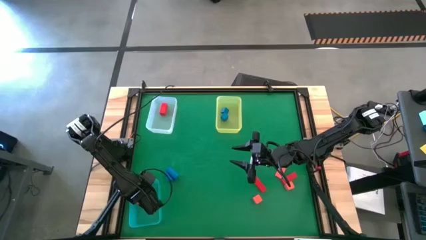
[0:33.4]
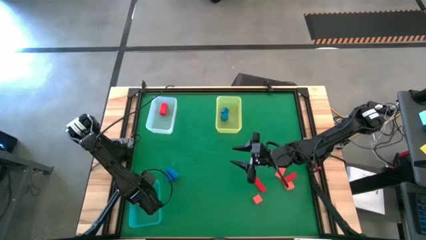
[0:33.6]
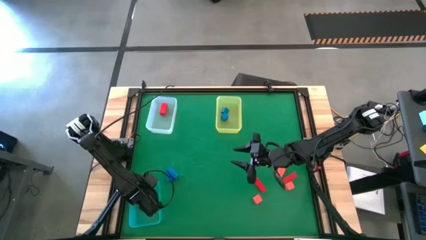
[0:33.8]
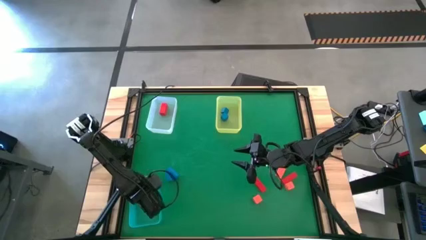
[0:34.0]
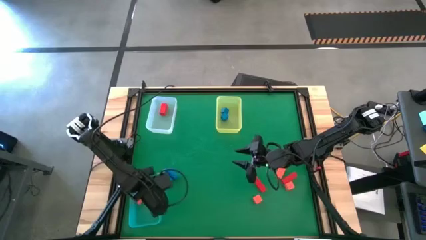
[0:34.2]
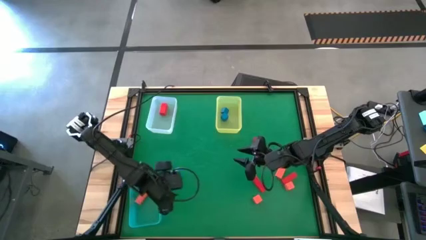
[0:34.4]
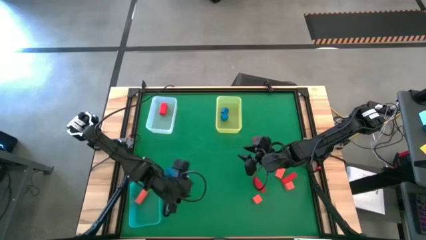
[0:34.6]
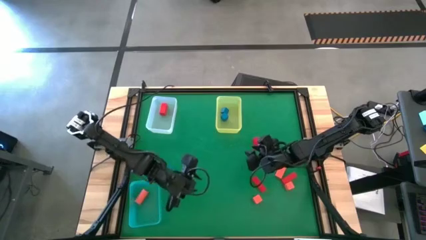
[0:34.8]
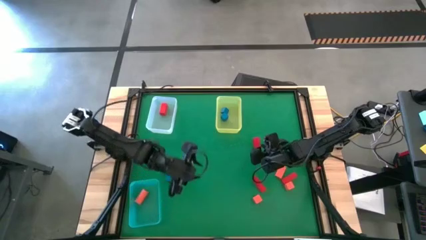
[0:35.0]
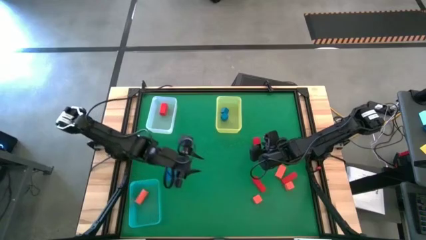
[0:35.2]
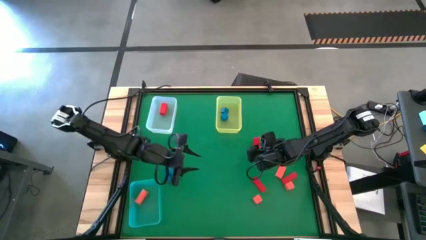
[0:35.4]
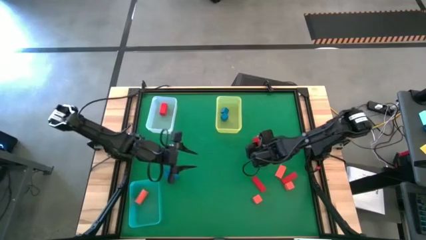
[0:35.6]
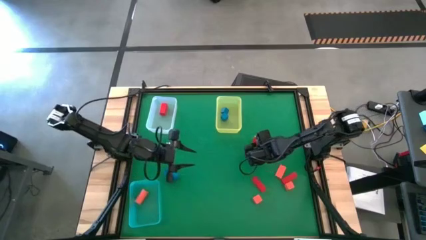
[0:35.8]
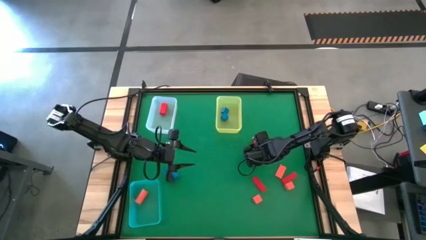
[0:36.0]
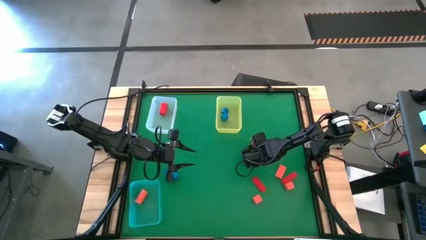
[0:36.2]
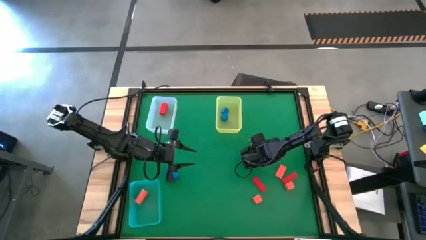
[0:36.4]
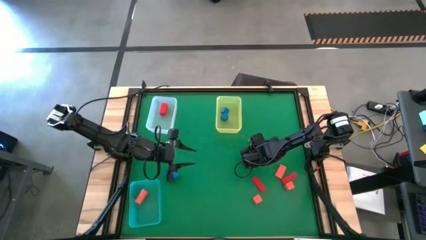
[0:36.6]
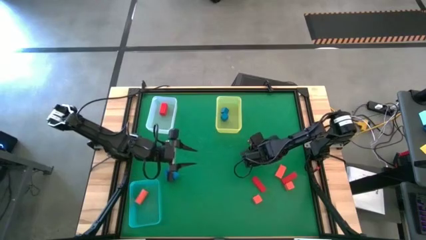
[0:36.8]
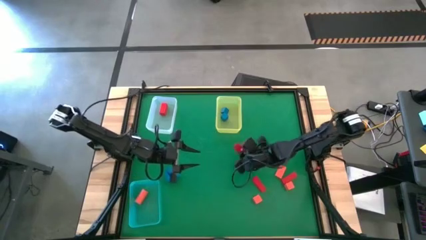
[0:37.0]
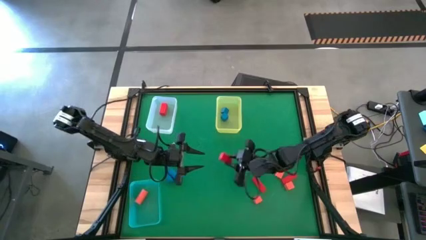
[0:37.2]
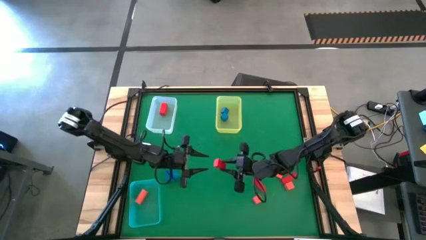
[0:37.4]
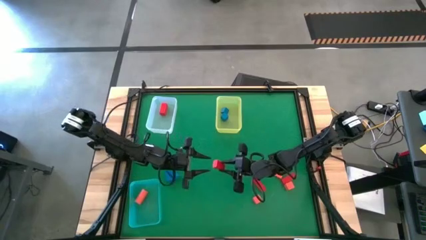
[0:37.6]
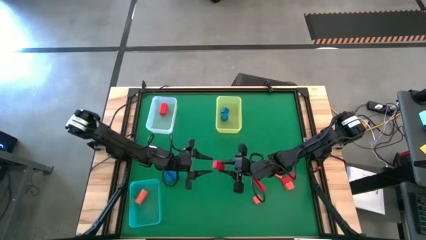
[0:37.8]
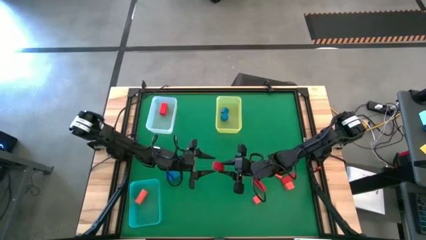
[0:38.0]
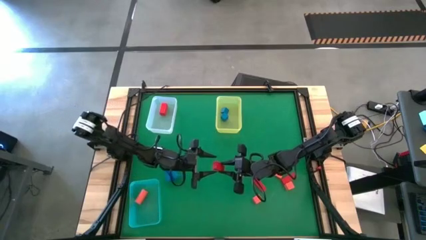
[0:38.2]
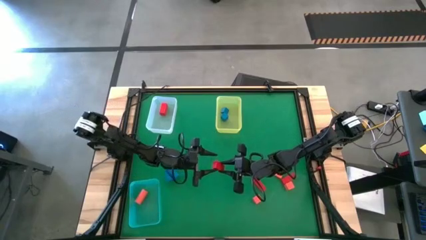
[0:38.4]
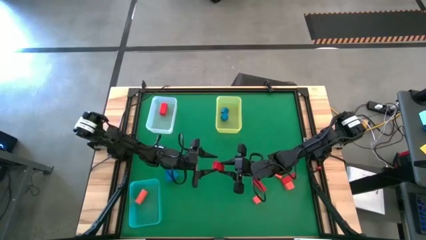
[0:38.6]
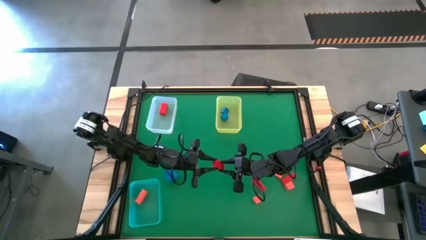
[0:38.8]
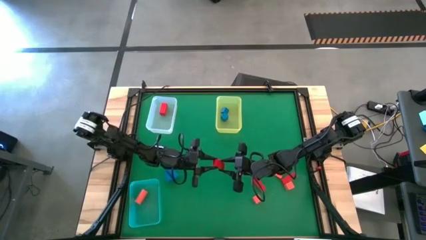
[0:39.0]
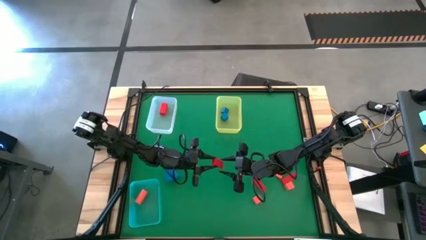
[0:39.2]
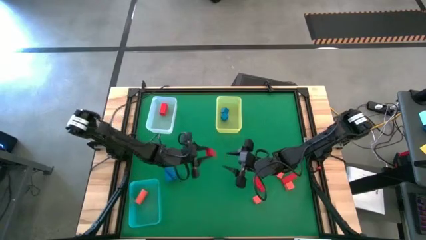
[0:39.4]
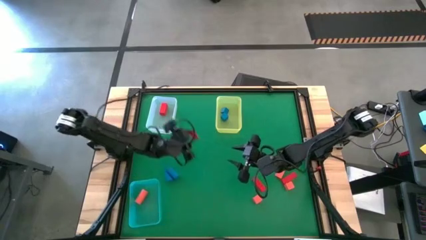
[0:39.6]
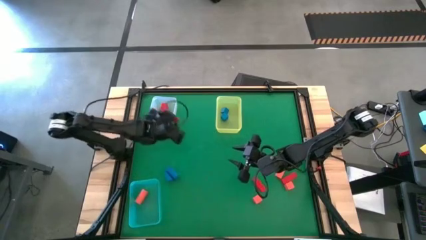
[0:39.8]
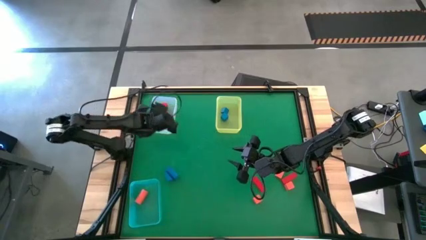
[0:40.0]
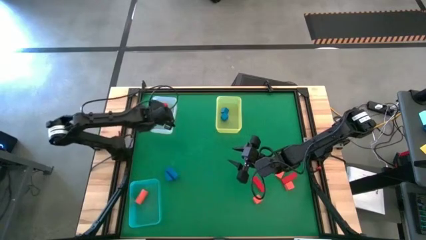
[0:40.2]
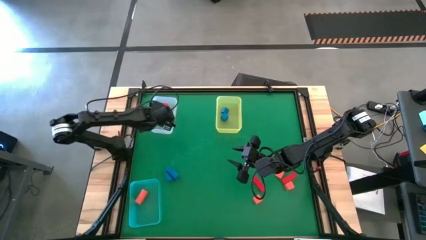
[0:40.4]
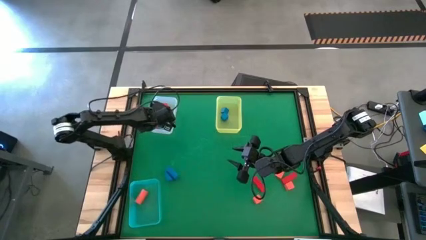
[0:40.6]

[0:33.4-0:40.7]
Task: Sort & place blocks by color
Put the red block into the white bin

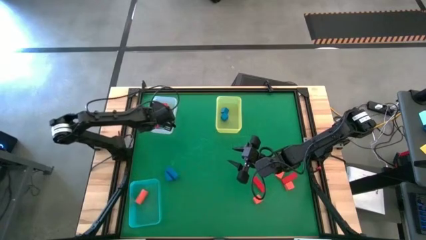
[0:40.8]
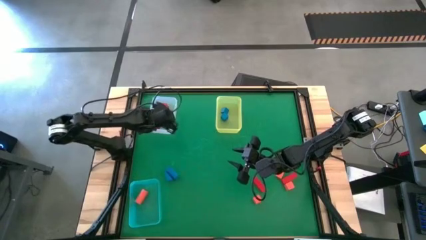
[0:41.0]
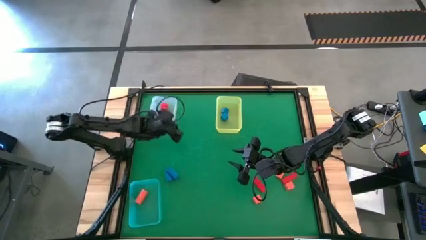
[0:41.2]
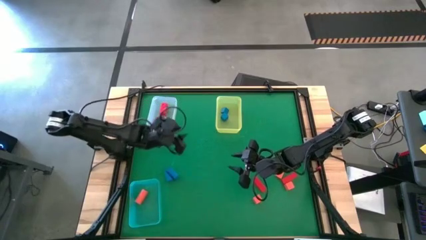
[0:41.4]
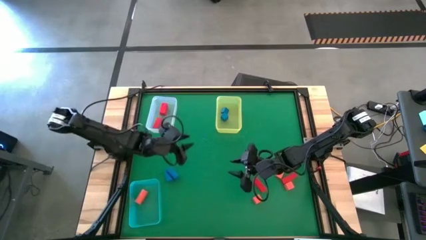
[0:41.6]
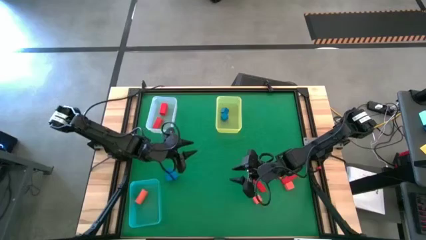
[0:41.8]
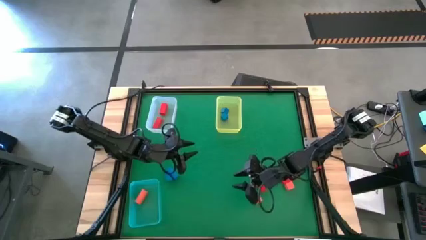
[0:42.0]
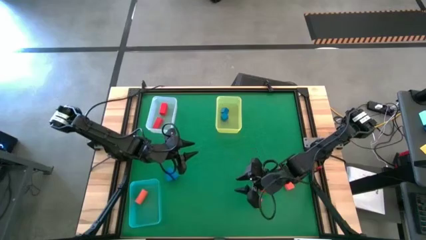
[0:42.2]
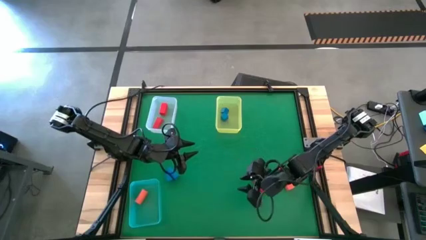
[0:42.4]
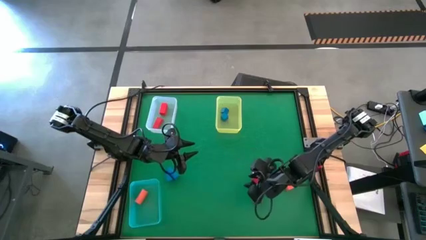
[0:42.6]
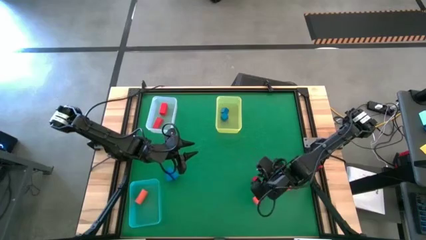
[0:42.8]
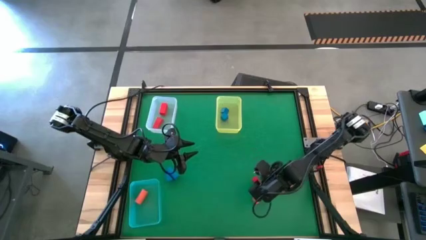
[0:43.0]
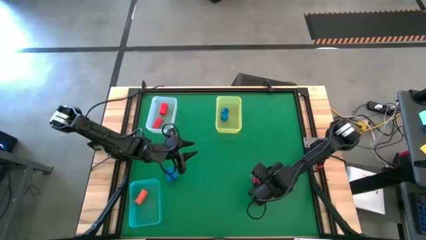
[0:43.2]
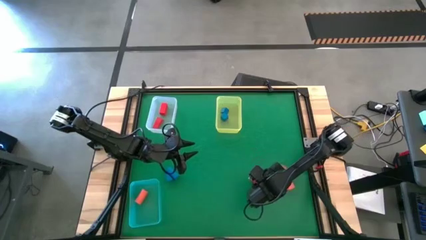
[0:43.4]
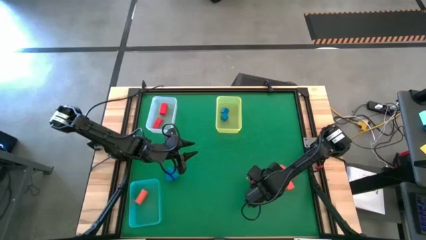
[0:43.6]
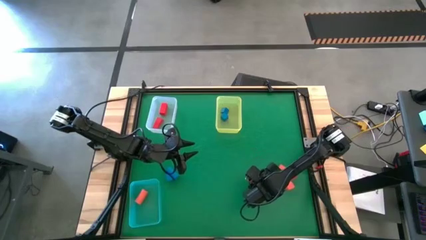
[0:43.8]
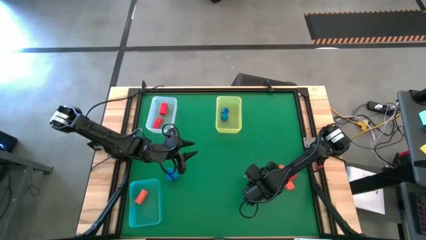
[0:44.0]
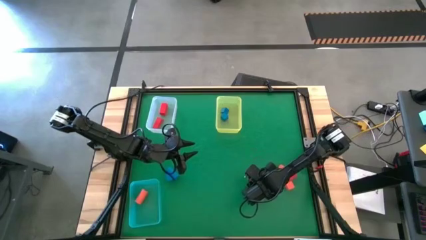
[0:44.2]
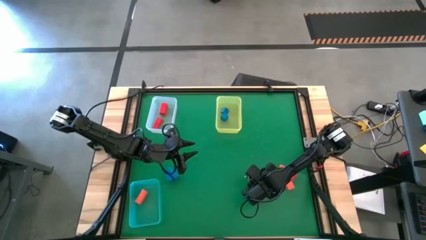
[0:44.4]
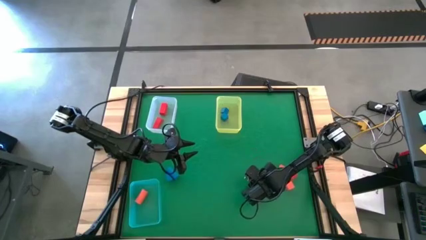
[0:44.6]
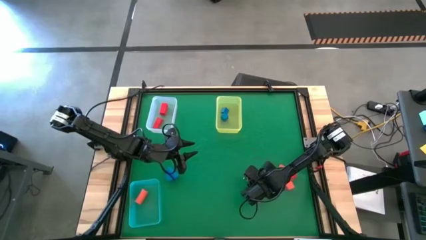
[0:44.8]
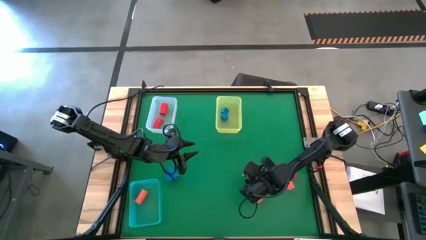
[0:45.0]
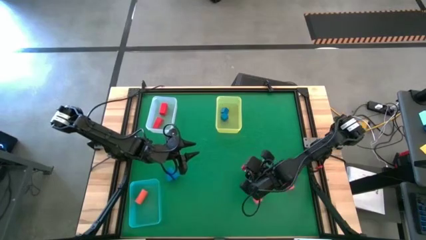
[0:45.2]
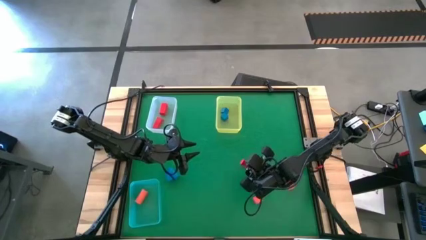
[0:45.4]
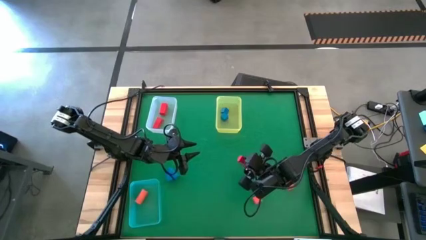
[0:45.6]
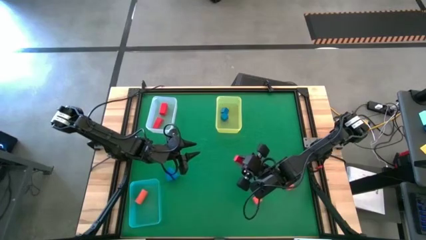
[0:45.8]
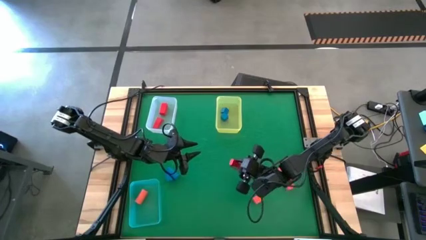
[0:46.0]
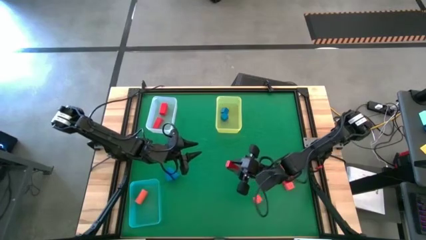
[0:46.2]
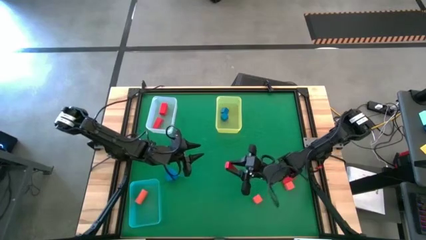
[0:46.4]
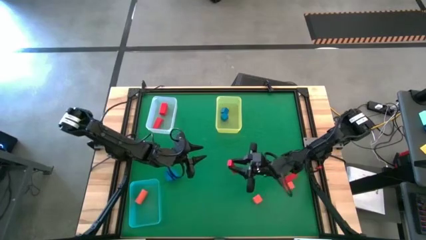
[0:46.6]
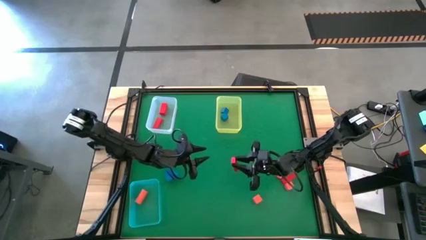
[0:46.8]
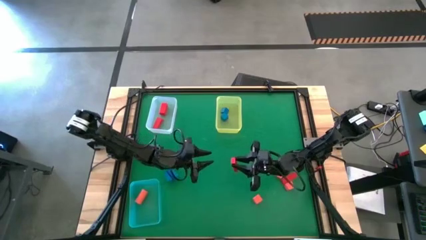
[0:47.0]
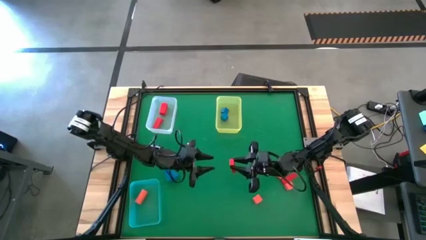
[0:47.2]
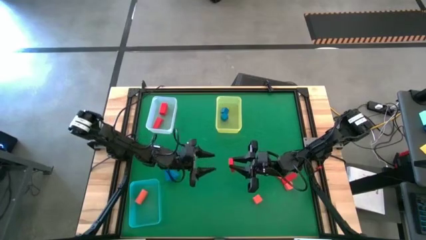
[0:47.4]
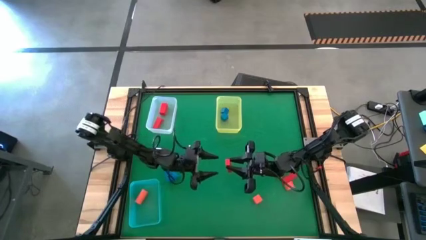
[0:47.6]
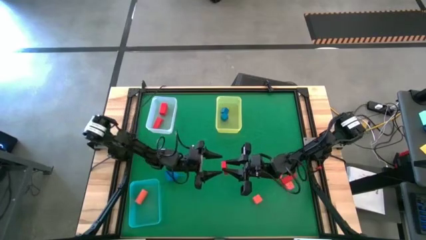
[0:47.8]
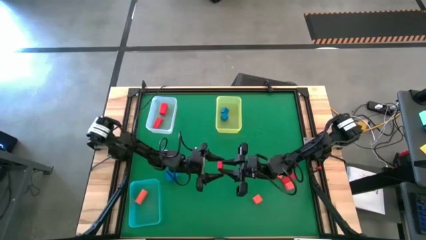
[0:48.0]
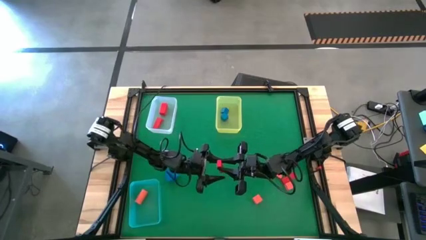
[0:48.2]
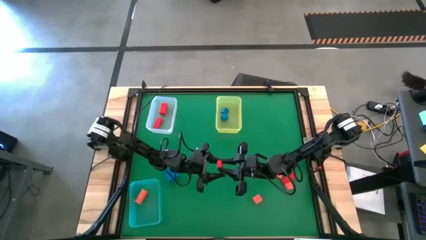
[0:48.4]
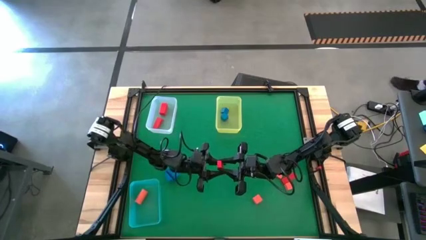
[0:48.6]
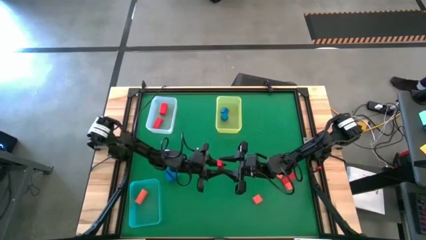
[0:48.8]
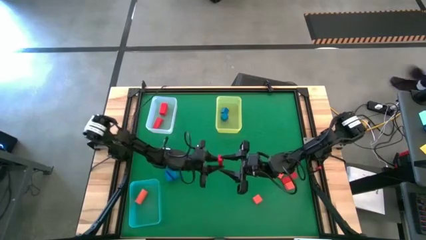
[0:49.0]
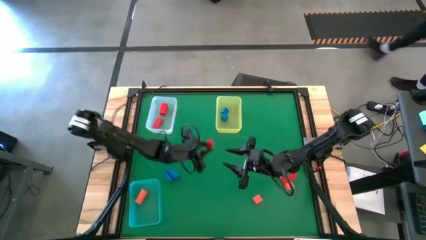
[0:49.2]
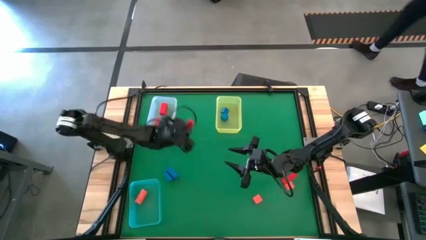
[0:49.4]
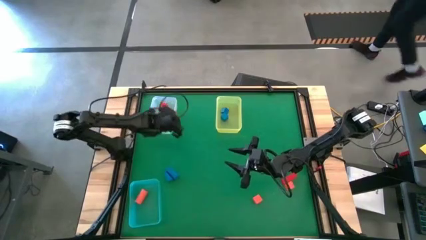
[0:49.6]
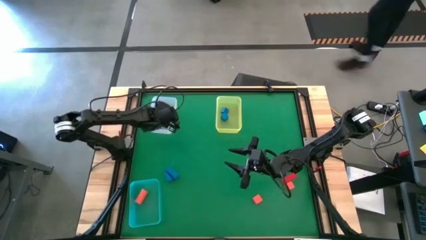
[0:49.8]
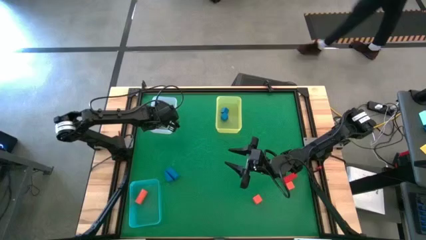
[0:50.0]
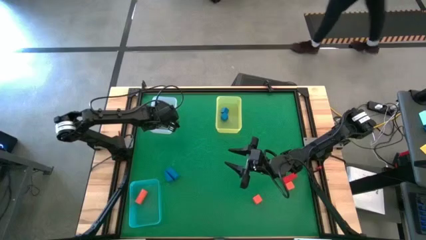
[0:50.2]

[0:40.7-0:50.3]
Put the red block into the white bin
